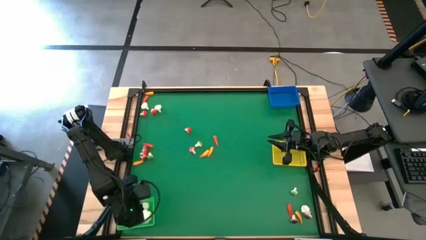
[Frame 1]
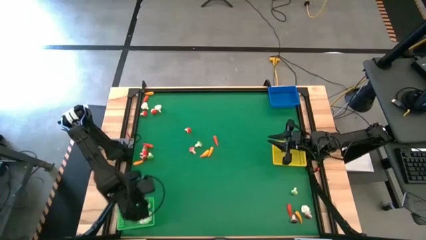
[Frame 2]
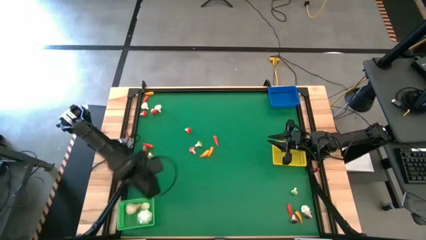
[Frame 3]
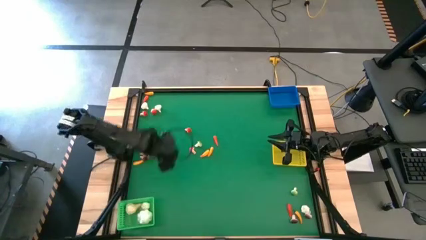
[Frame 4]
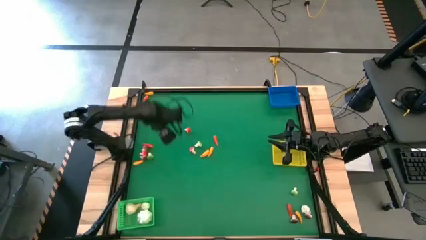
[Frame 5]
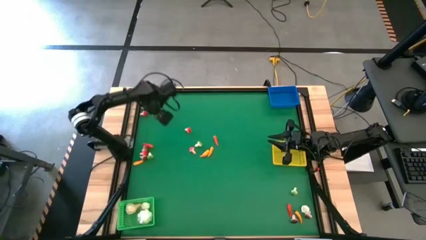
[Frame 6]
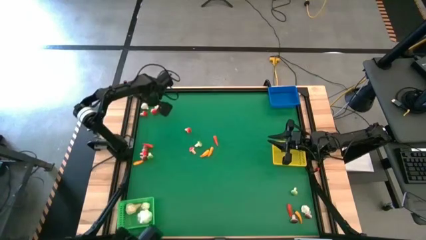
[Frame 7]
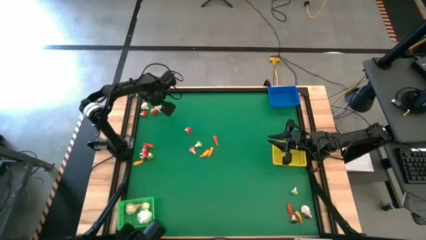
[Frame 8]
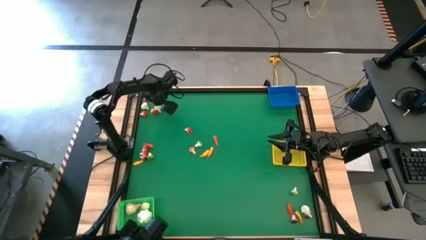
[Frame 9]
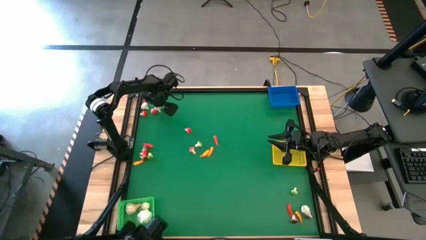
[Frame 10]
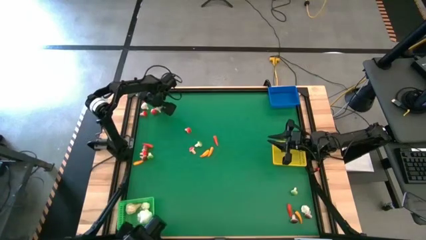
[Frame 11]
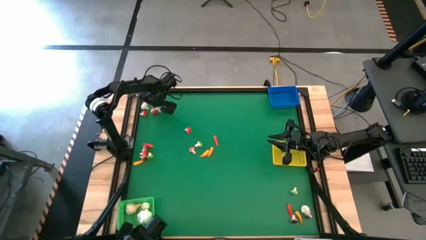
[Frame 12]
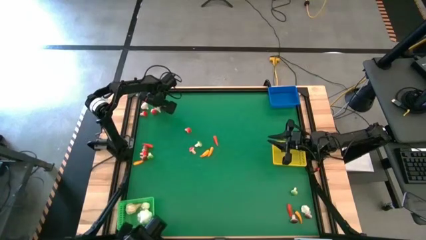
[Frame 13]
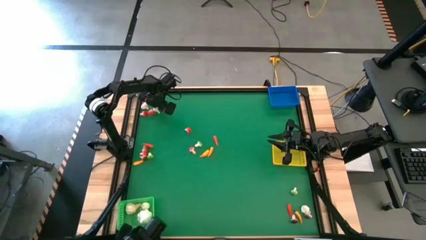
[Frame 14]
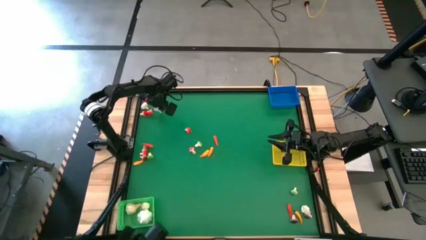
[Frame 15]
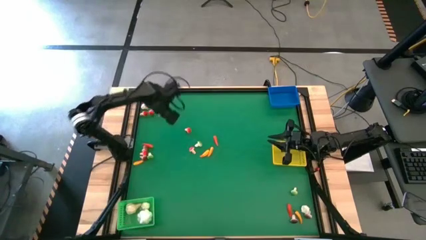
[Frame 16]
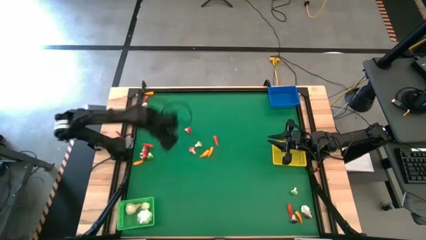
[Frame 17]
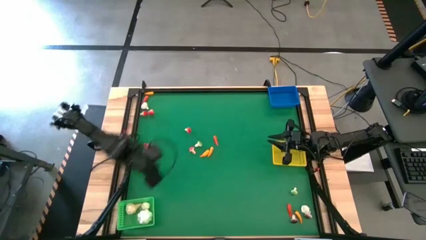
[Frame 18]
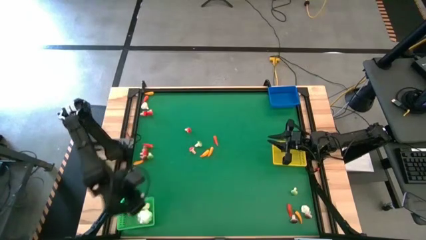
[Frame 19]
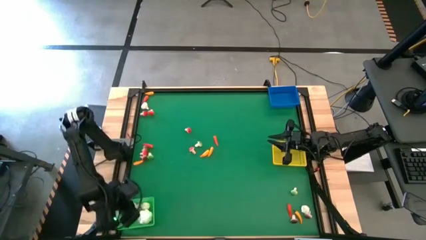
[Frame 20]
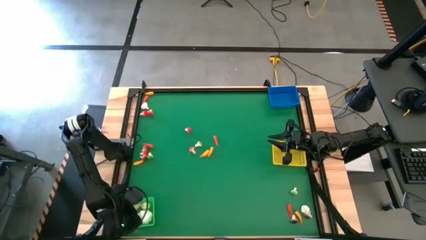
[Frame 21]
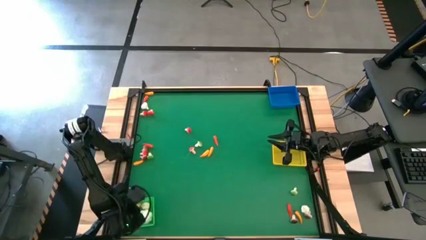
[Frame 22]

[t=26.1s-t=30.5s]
Task: Sort produce into baskets
Put the white garlic into the green bin

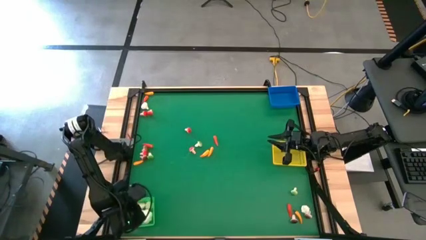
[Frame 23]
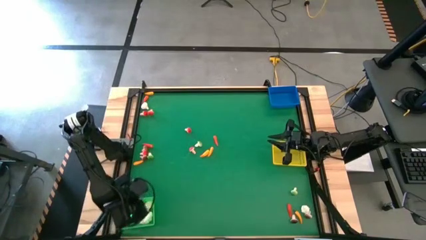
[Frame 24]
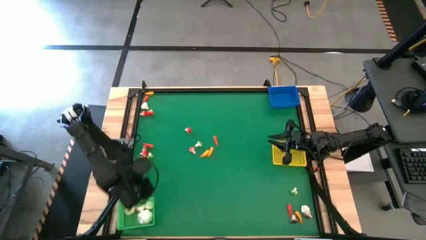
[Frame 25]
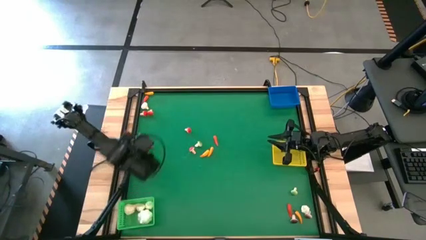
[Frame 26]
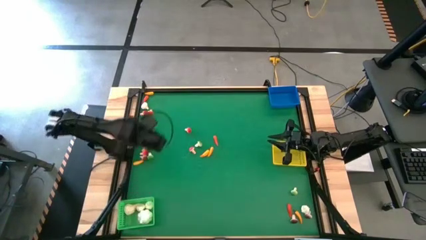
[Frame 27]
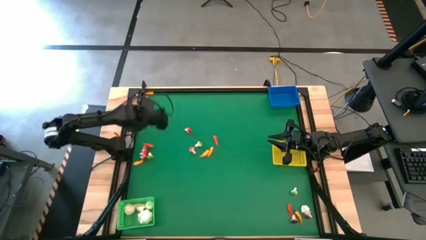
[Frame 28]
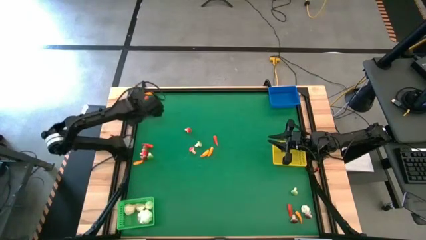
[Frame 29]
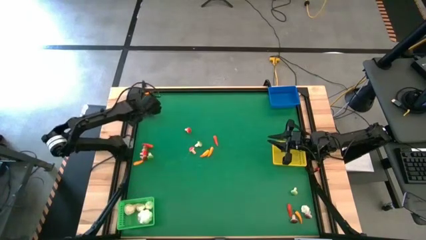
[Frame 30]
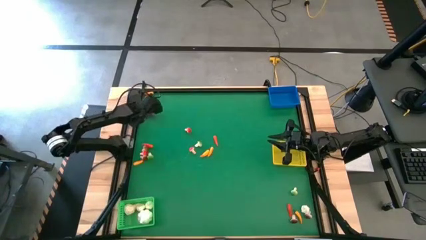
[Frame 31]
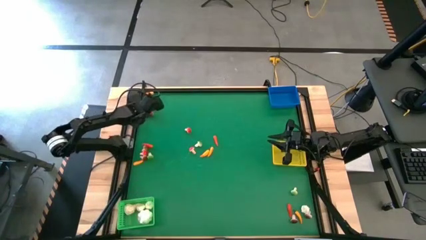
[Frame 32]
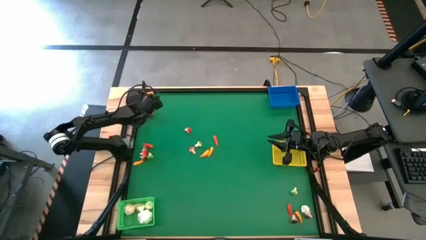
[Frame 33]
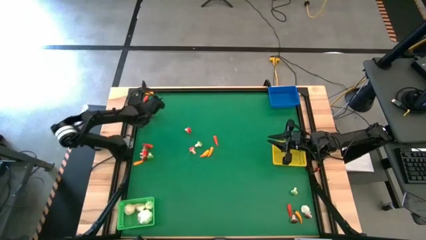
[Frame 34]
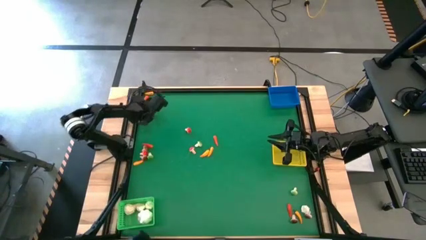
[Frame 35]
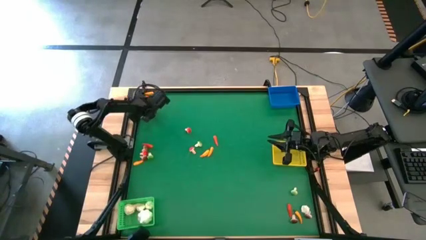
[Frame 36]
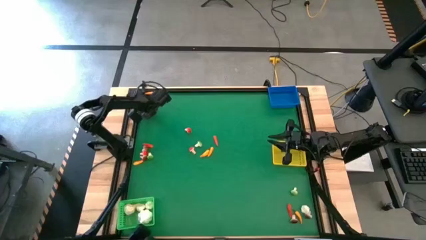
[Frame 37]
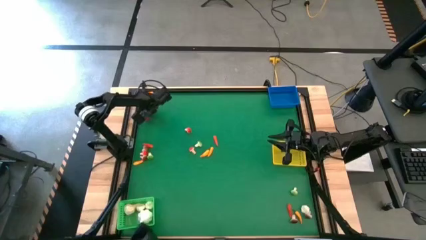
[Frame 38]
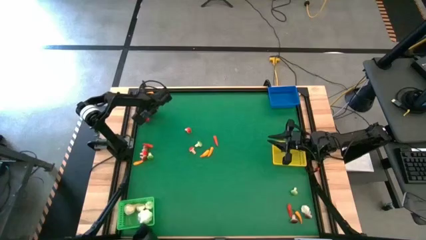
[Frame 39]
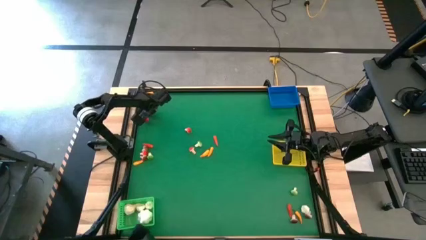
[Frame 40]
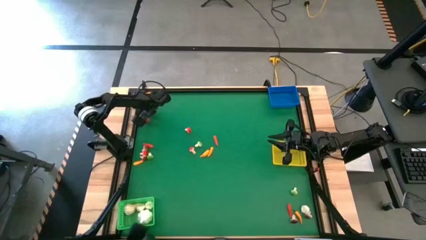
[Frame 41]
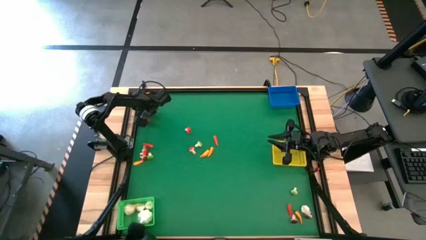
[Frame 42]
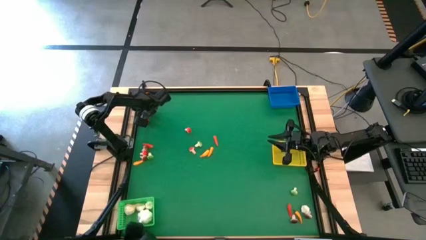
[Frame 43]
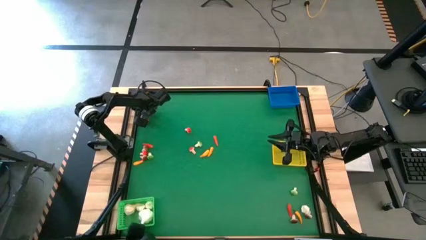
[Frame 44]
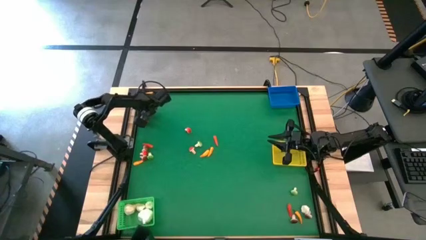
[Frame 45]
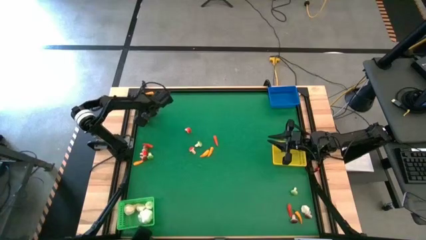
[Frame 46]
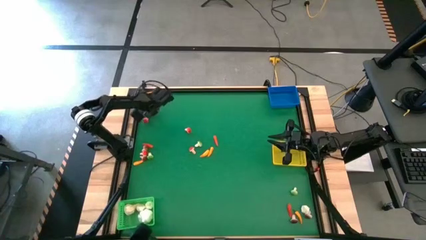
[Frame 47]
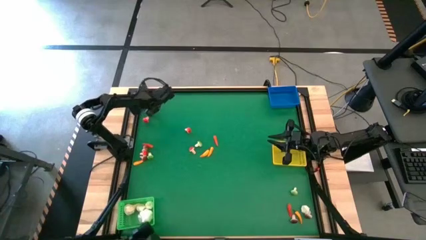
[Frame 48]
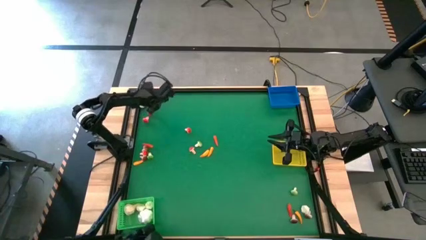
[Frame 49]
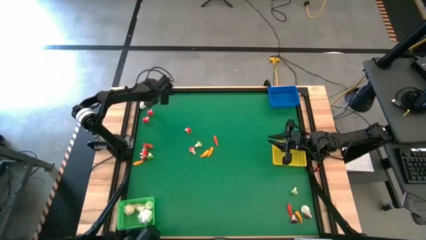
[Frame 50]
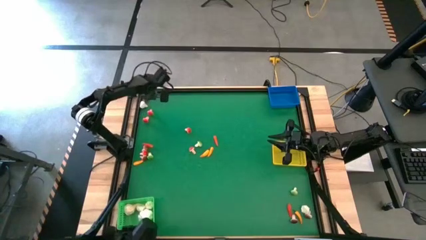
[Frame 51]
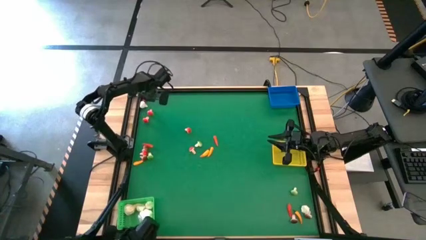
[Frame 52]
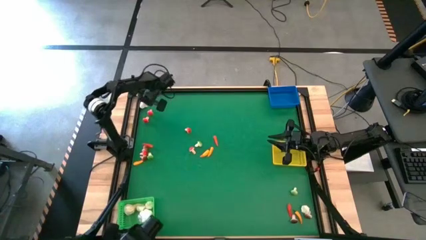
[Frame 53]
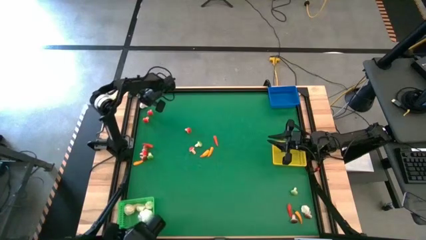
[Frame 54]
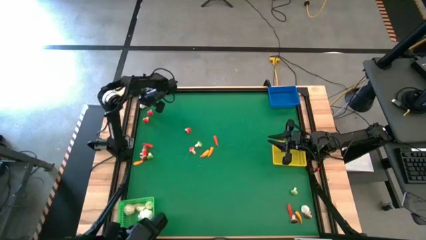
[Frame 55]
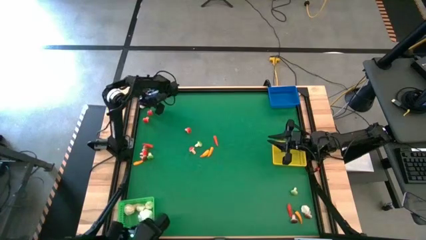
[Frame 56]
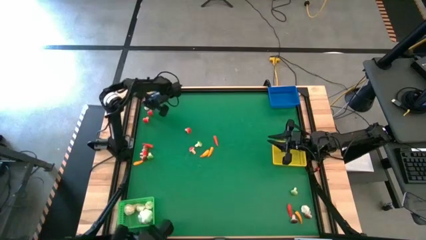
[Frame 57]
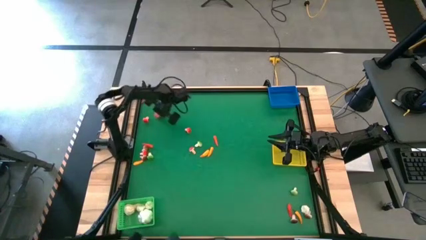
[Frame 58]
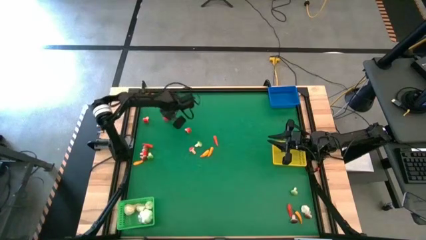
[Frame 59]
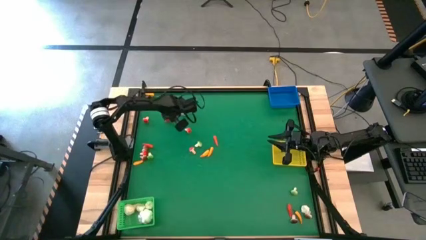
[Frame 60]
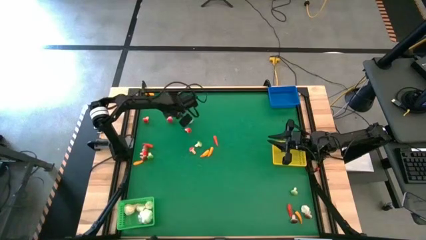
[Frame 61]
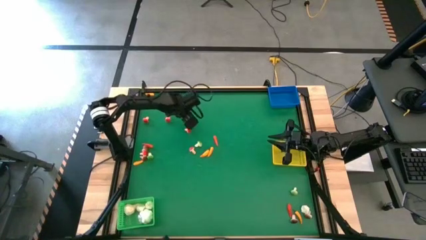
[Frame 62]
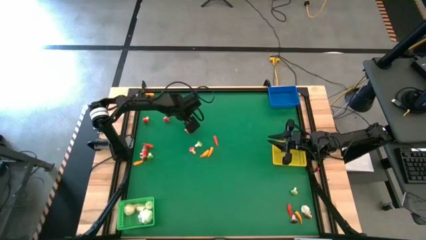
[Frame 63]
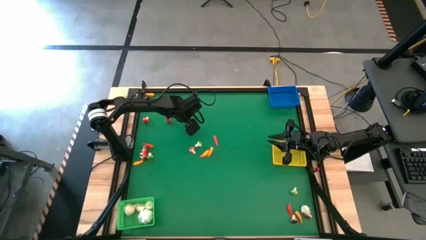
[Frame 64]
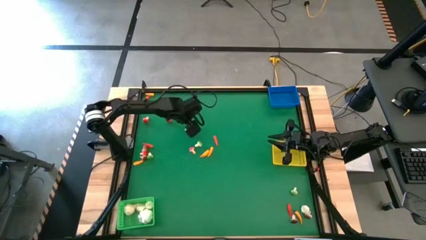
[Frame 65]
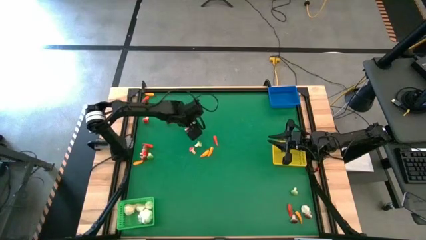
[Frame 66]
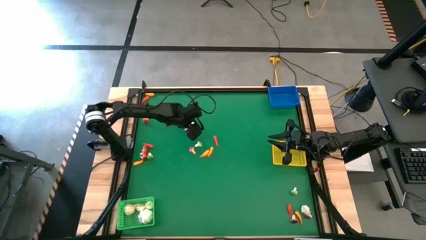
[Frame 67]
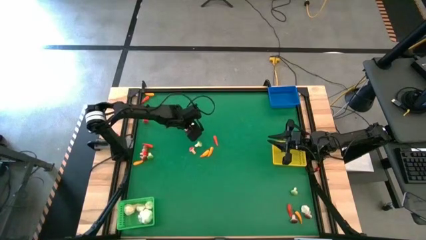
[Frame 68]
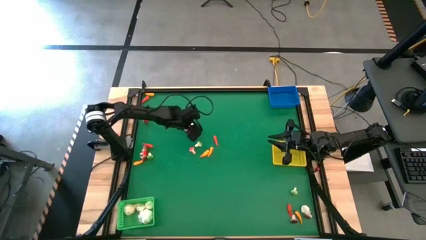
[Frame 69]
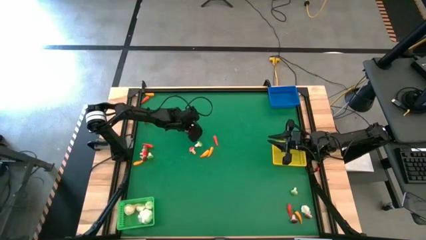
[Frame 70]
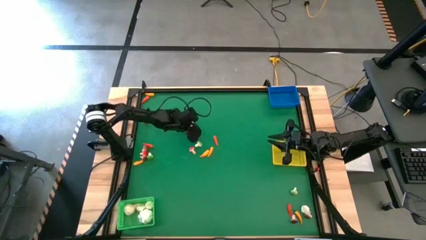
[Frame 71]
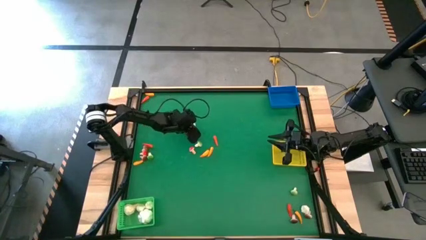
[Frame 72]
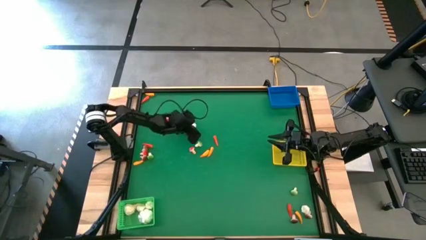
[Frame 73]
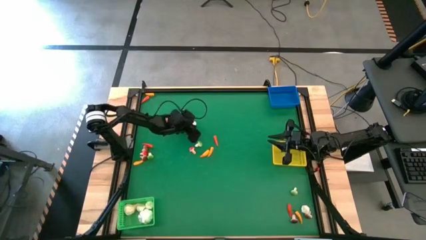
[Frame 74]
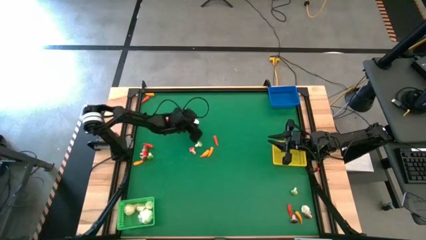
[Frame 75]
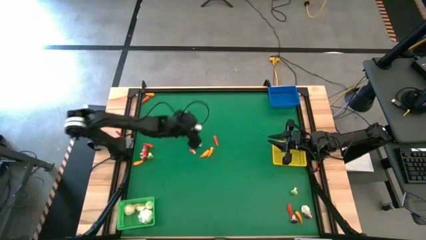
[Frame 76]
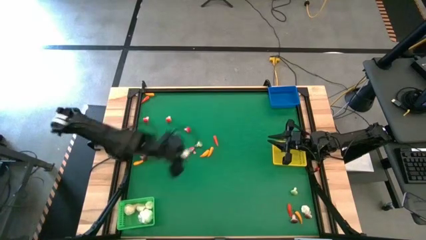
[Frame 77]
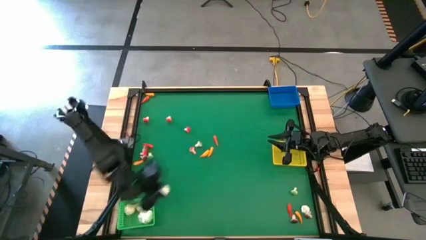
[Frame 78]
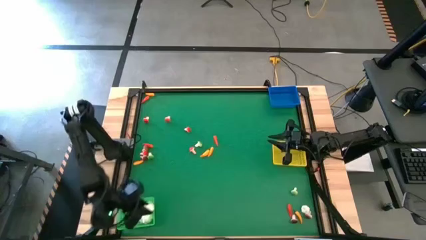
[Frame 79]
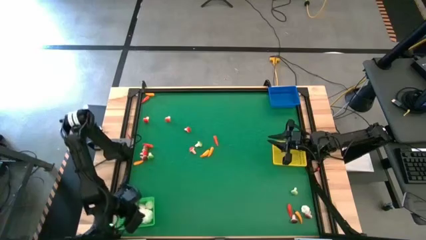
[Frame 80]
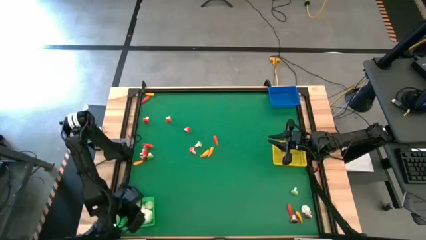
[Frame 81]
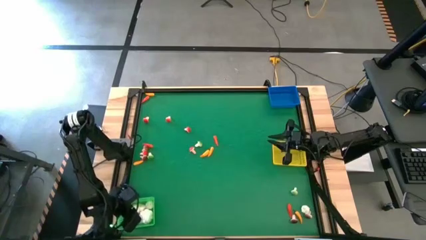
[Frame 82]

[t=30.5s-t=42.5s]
Put the white garlic into the green bin
